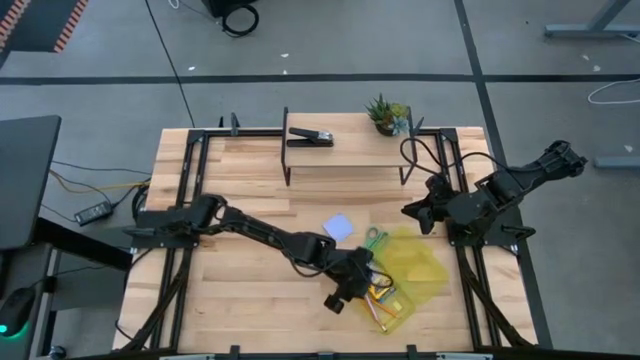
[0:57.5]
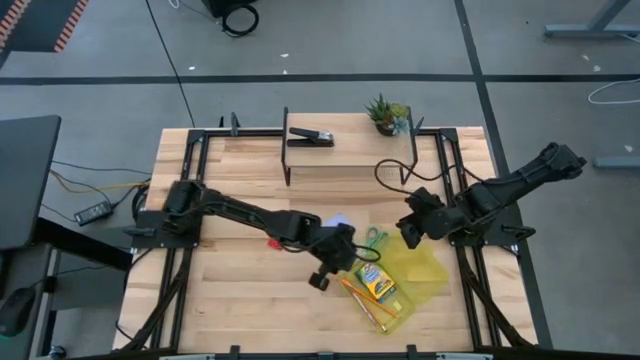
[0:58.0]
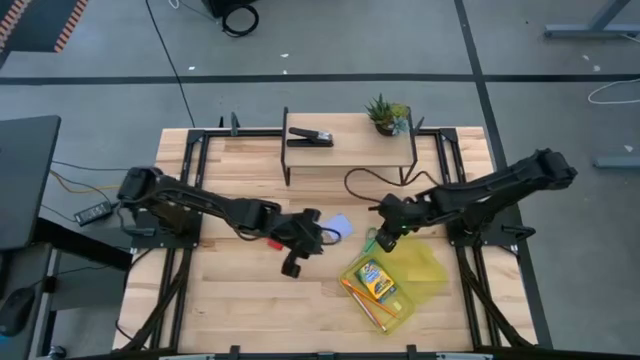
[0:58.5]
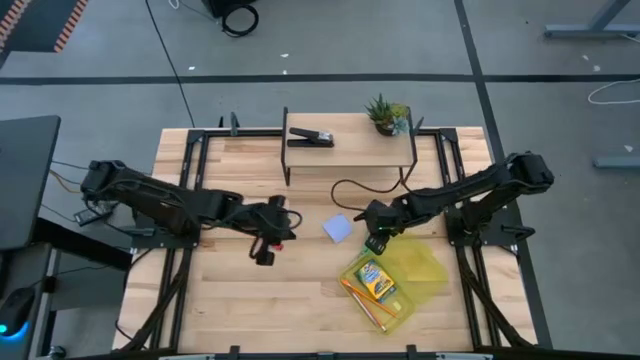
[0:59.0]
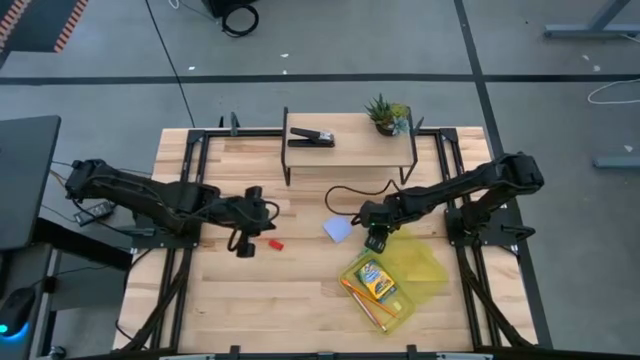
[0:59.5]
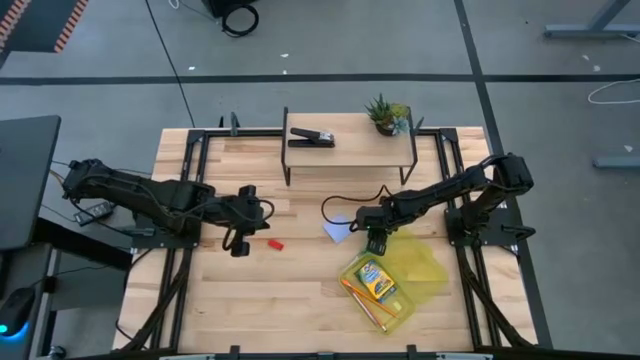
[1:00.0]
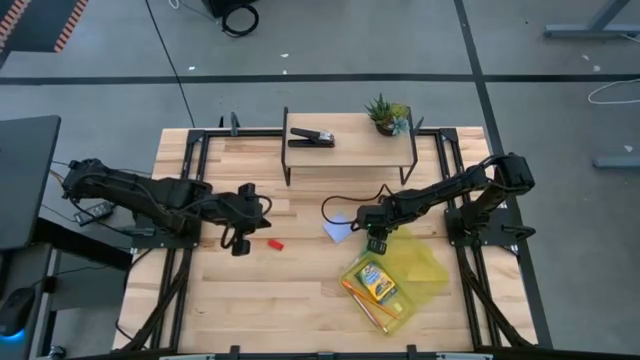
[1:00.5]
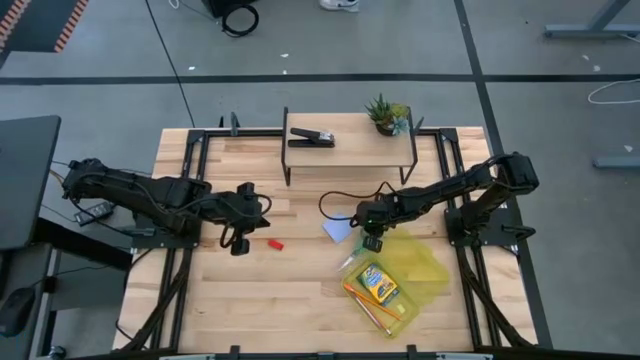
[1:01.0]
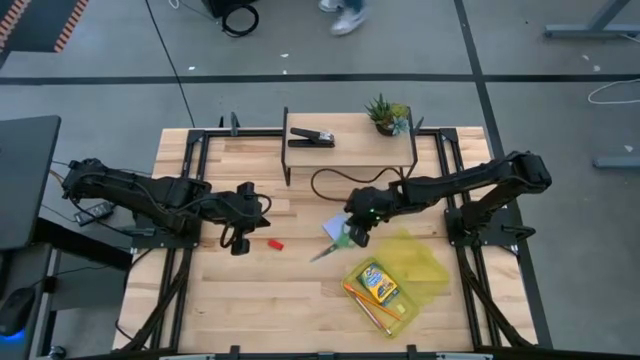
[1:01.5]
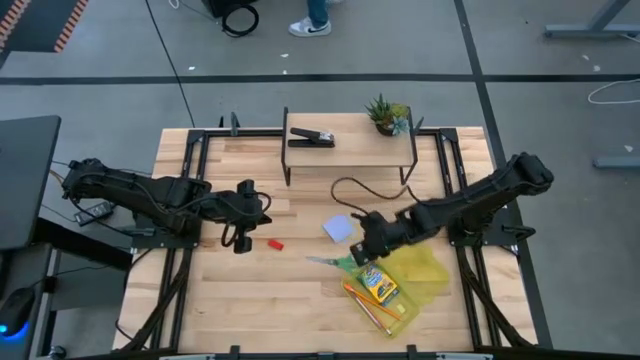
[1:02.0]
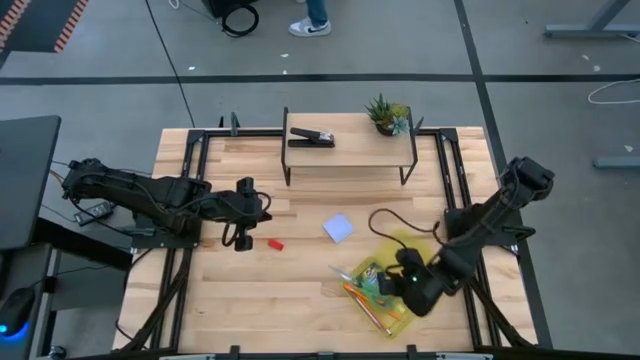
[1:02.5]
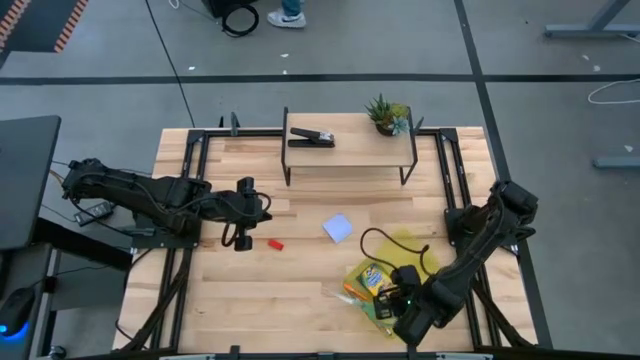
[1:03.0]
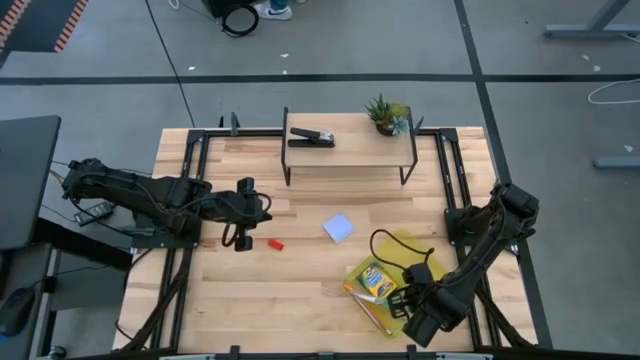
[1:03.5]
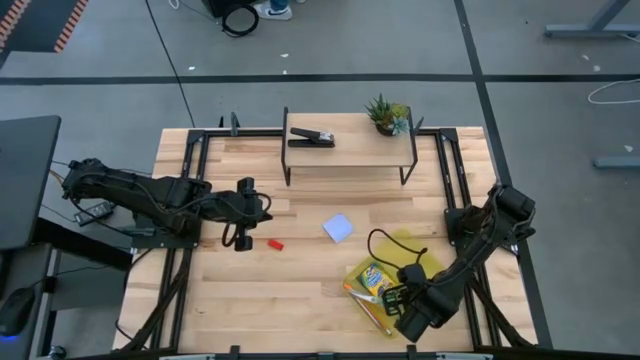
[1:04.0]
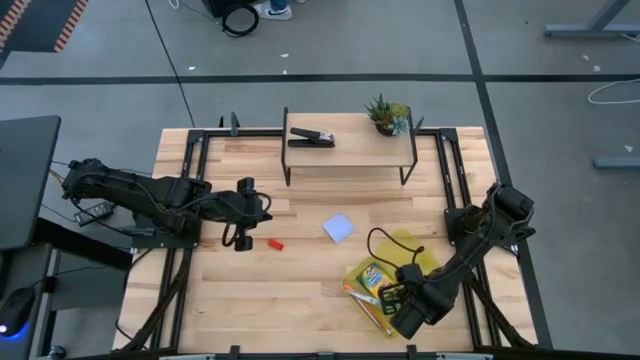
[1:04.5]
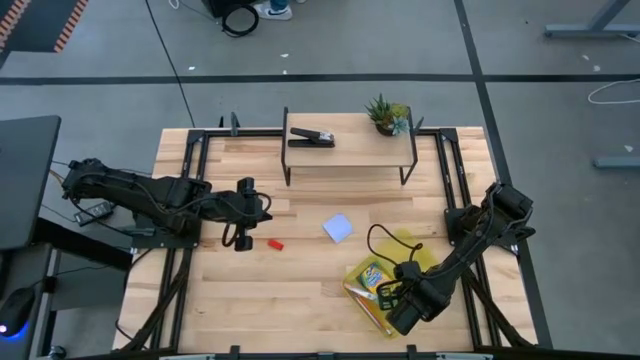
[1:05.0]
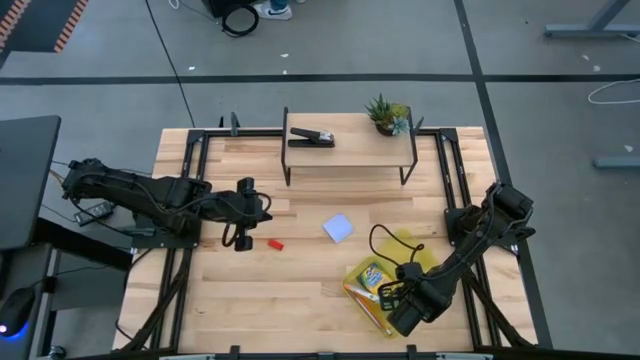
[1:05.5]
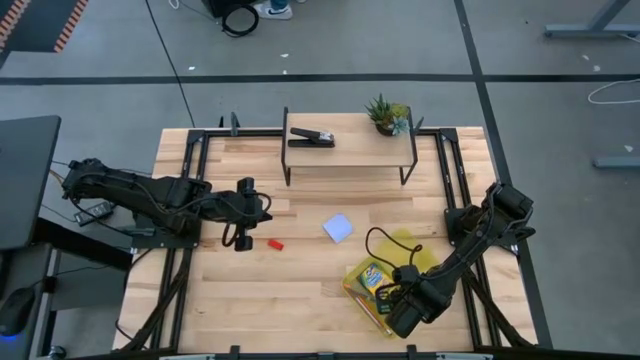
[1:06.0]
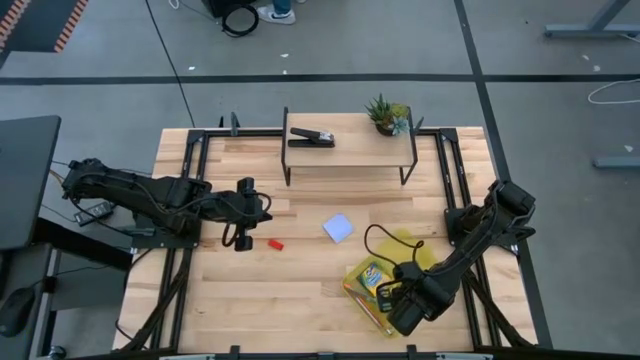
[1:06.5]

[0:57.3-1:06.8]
Task: Pack school essentials
Put the green scissors into the yellow supply box

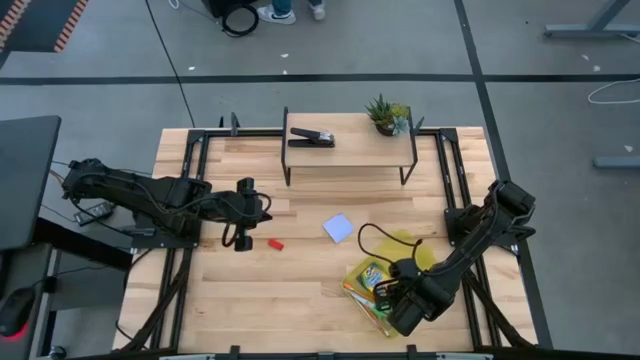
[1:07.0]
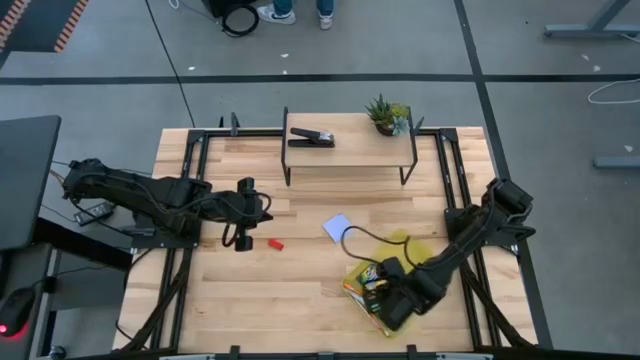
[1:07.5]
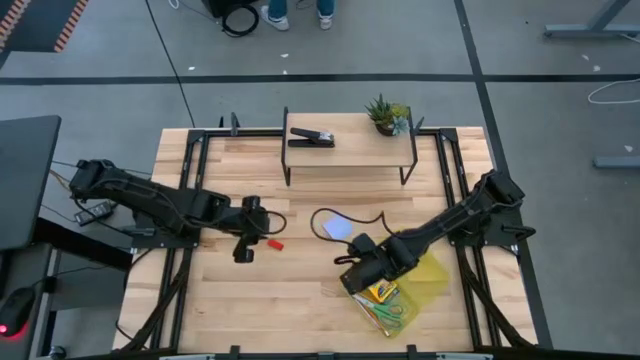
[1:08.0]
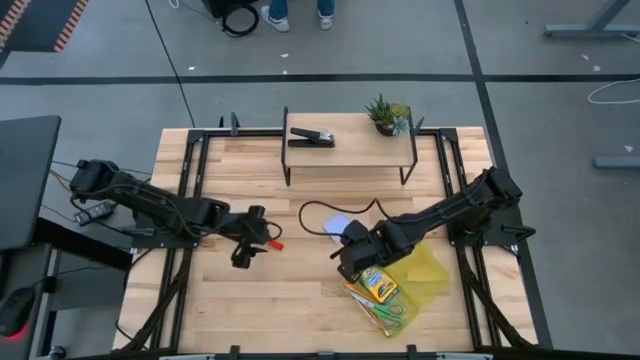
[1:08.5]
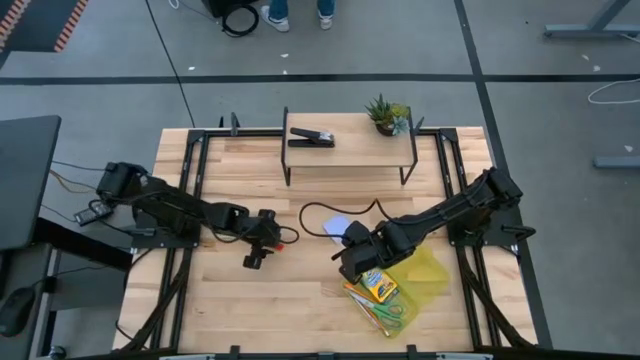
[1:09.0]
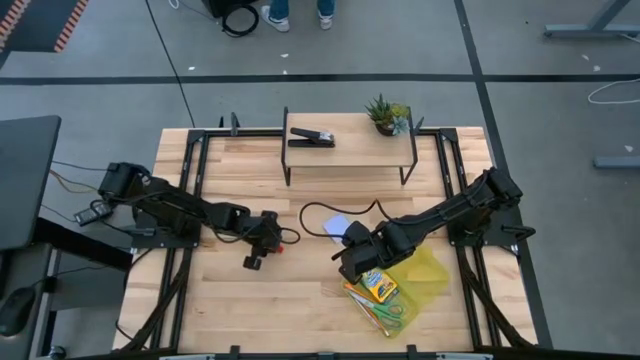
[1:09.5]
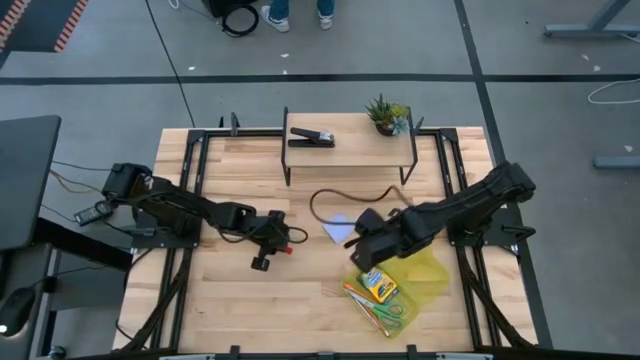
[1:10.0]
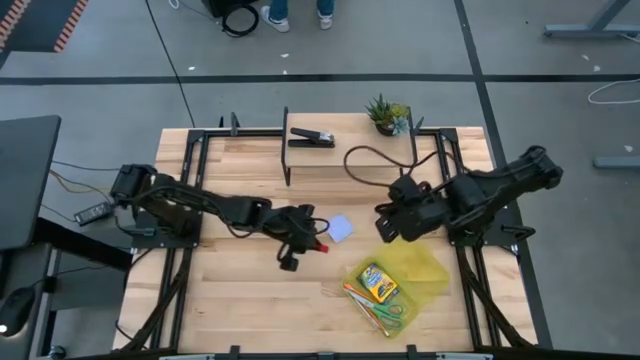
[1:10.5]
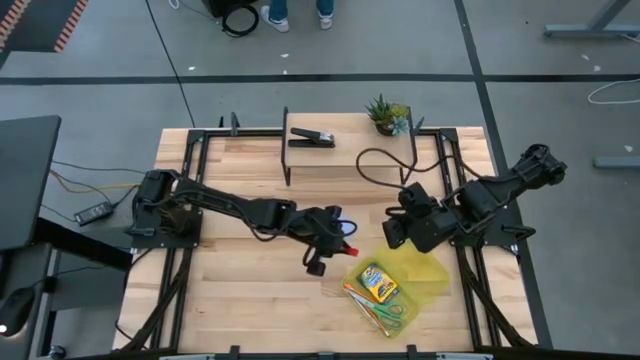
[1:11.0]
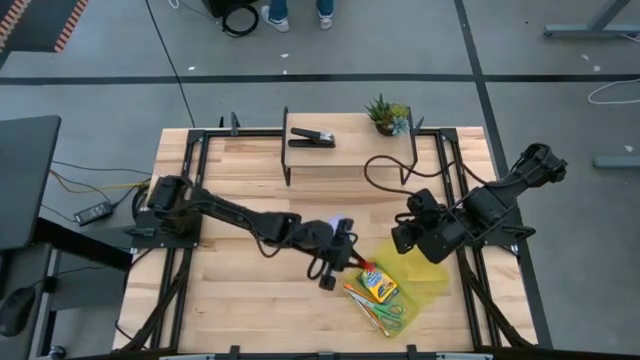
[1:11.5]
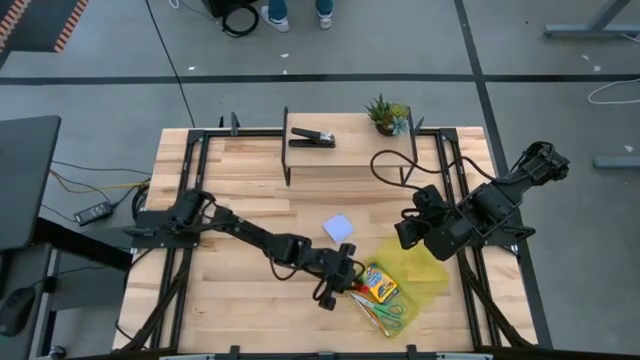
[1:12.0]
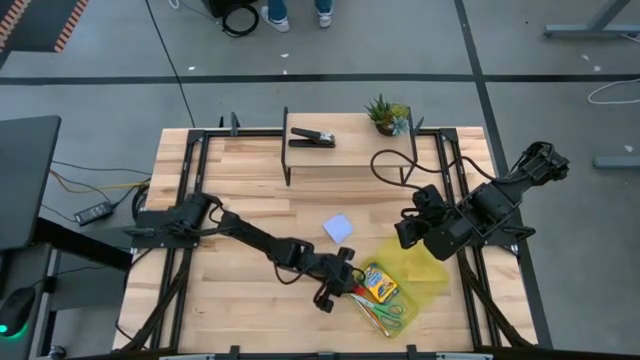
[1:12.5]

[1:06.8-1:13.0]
Put the red eraser into the yellow supply box

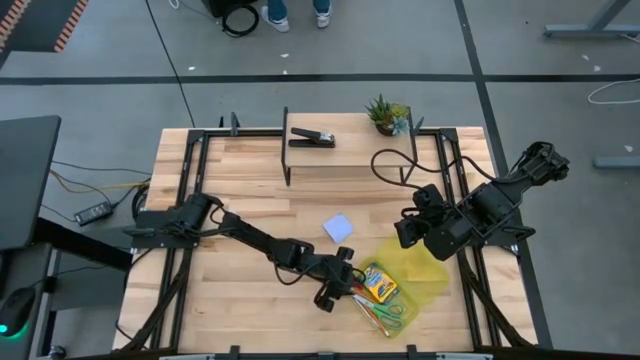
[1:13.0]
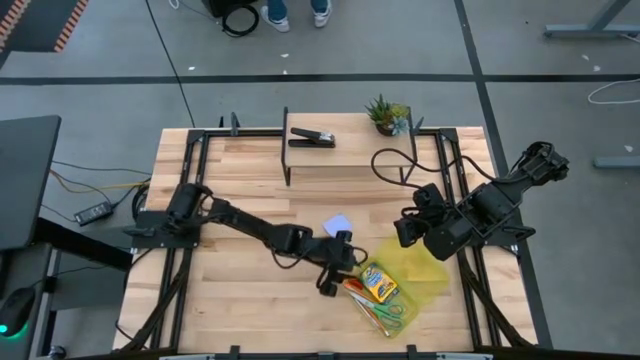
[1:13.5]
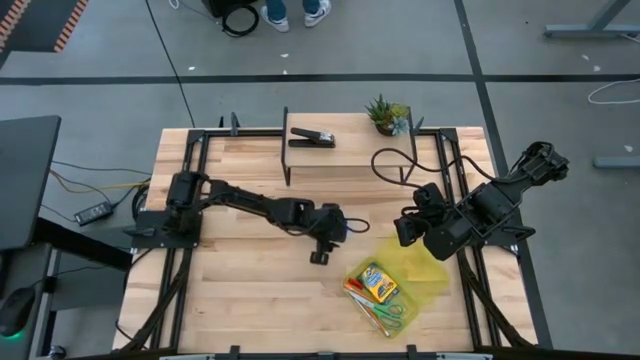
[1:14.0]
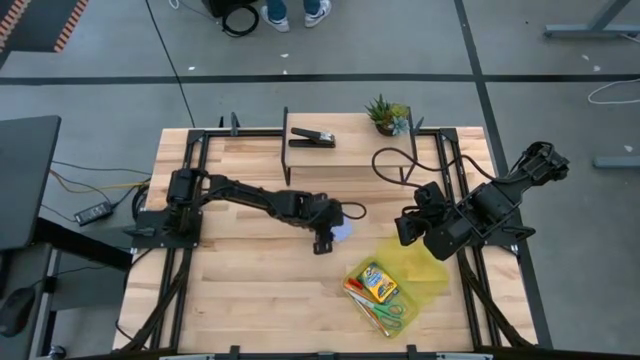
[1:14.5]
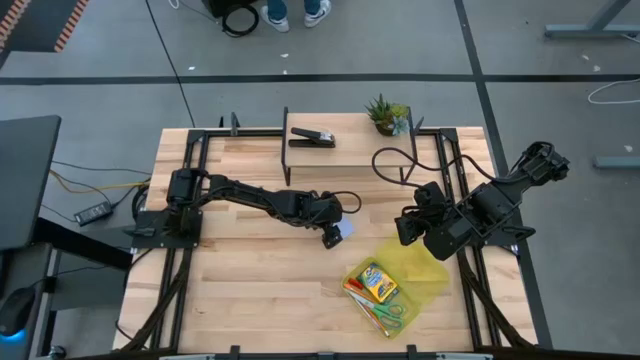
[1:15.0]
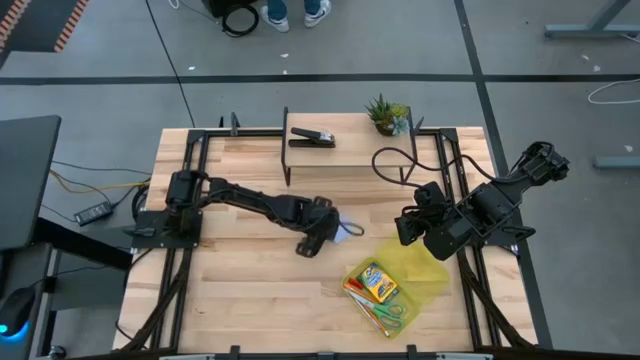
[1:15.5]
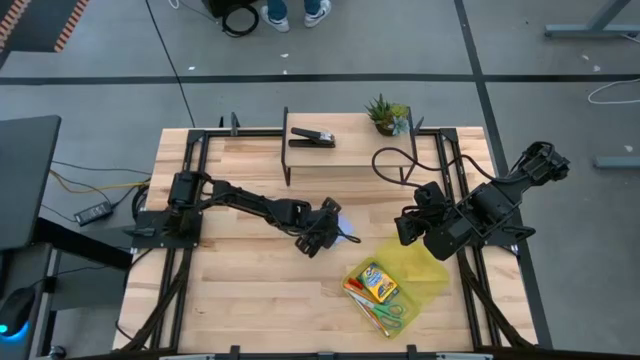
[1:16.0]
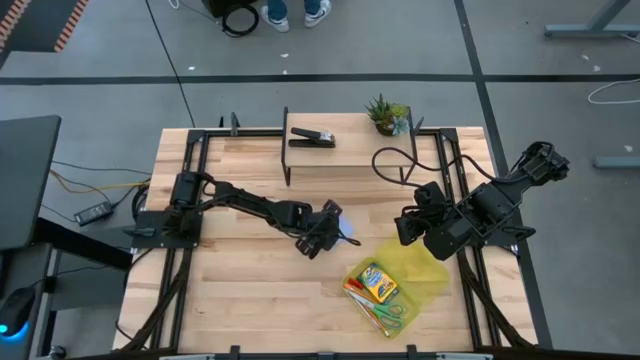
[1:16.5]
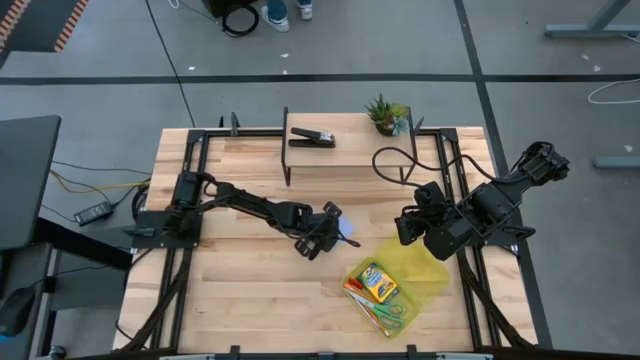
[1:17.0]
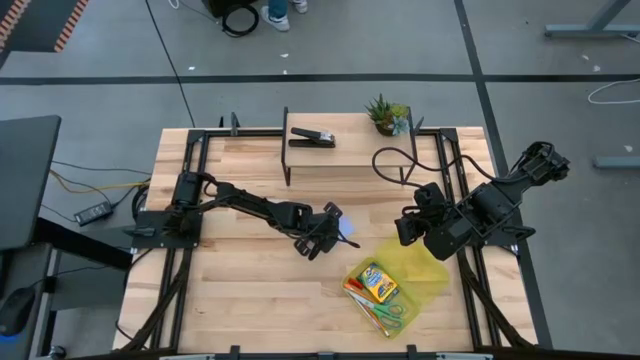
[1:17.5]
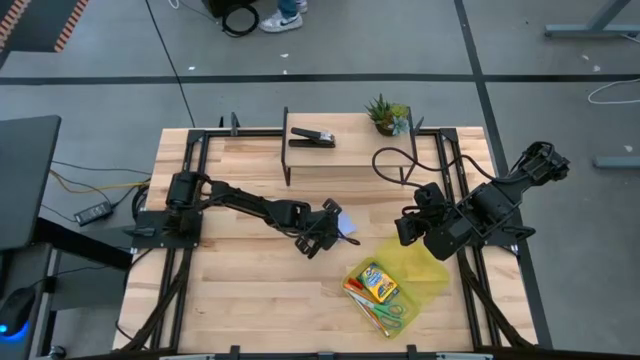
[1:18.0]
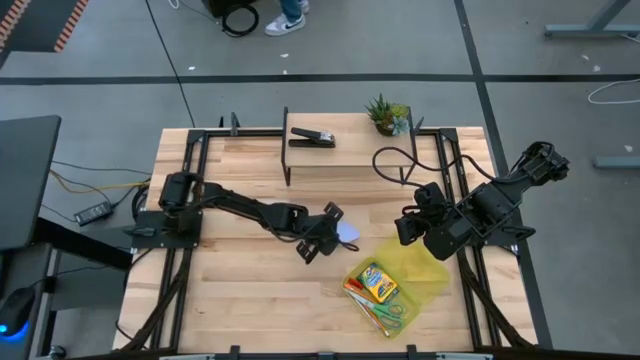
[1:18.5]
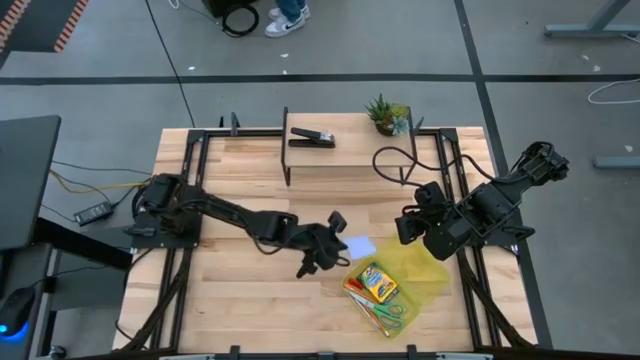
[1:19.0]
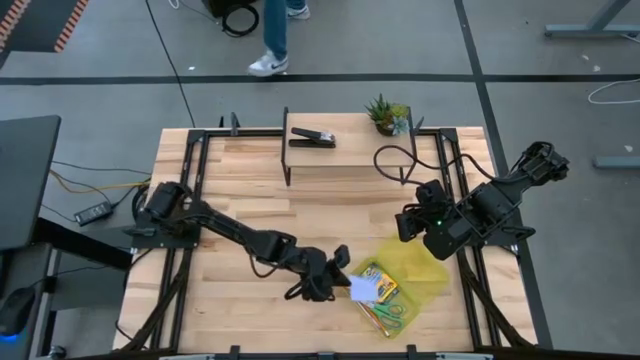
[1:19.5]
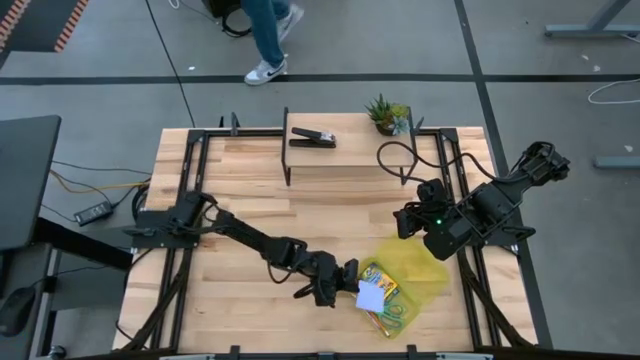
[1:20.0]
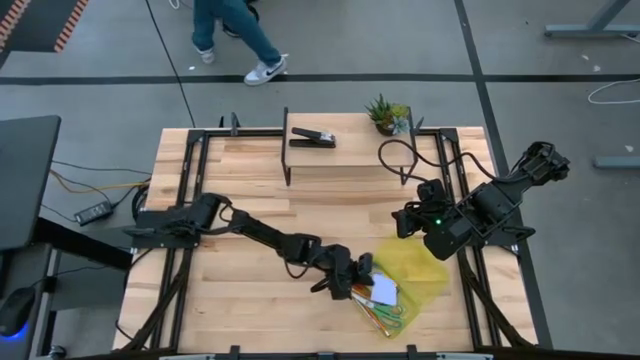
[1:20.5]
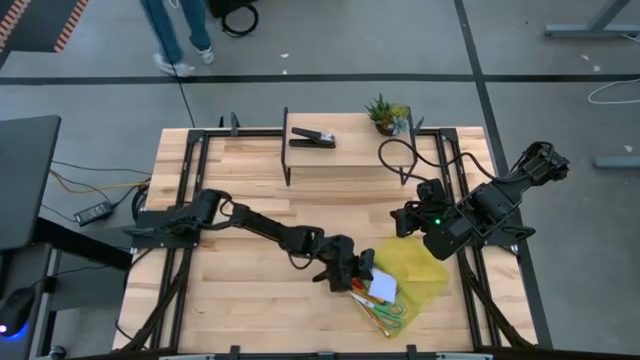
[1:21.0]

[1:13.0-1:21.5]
Put the violet sticky note into the yellow supply box
